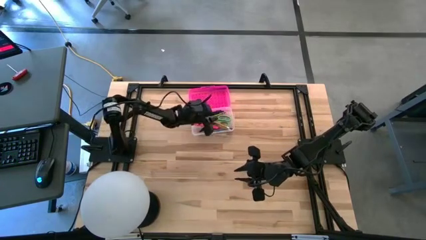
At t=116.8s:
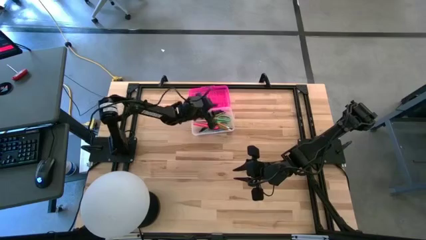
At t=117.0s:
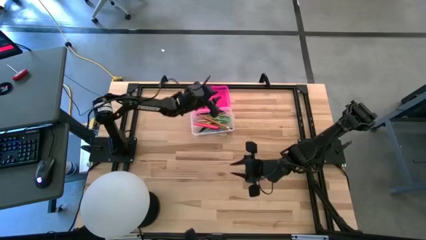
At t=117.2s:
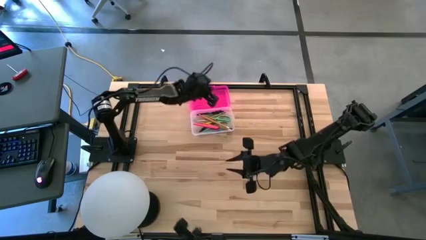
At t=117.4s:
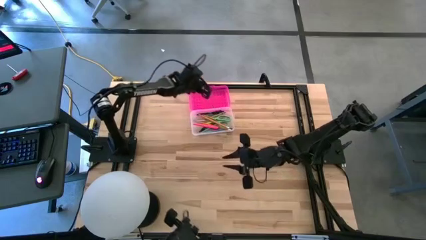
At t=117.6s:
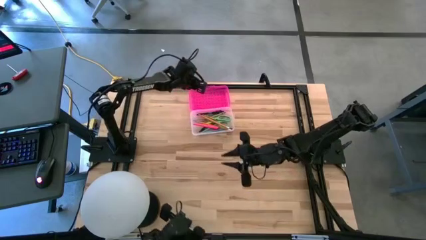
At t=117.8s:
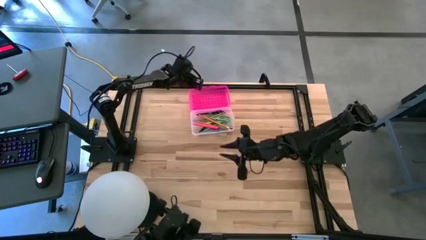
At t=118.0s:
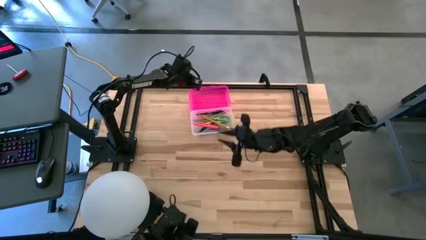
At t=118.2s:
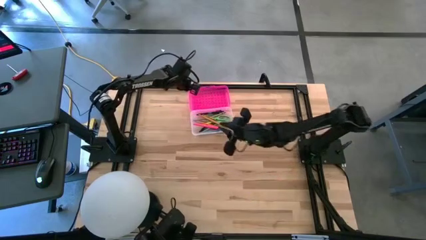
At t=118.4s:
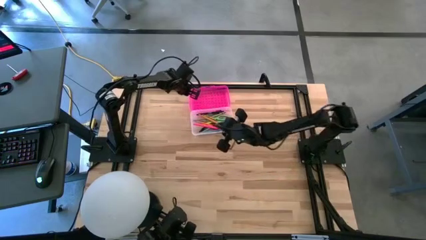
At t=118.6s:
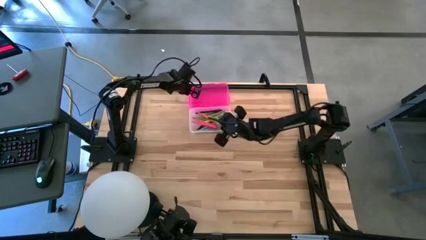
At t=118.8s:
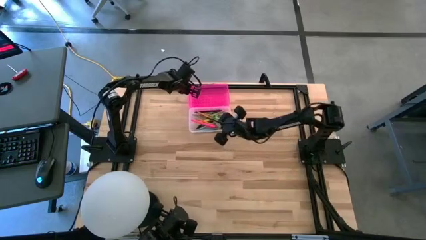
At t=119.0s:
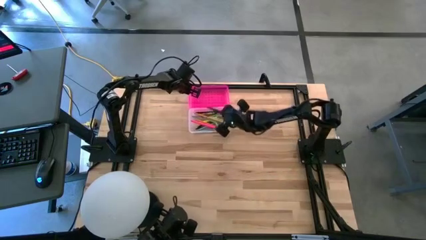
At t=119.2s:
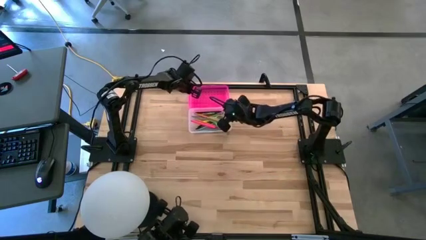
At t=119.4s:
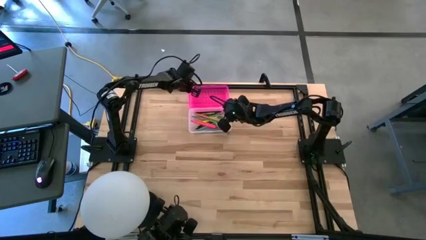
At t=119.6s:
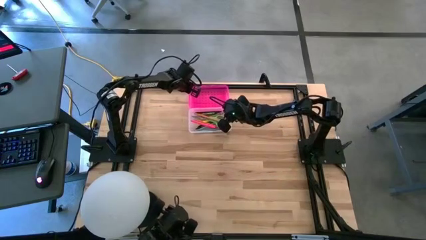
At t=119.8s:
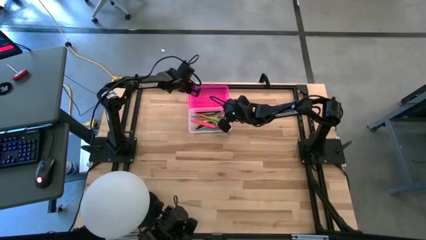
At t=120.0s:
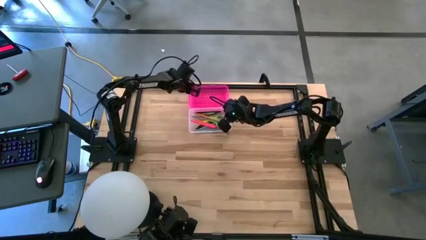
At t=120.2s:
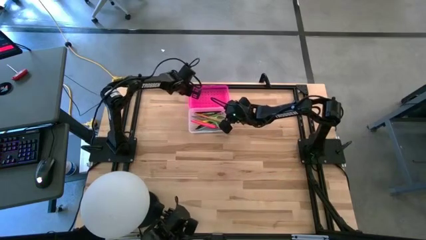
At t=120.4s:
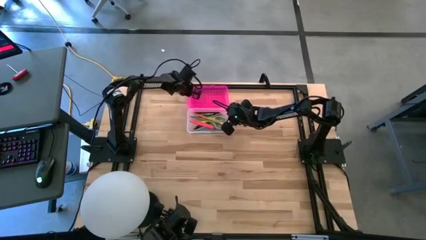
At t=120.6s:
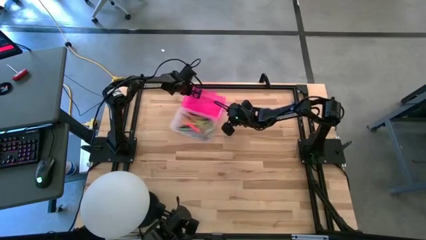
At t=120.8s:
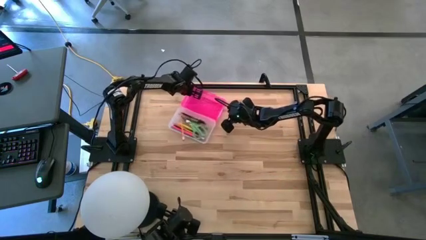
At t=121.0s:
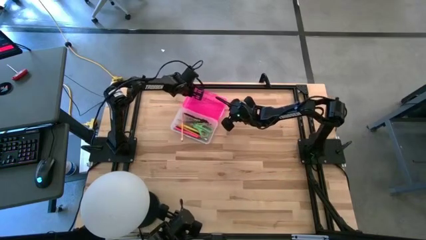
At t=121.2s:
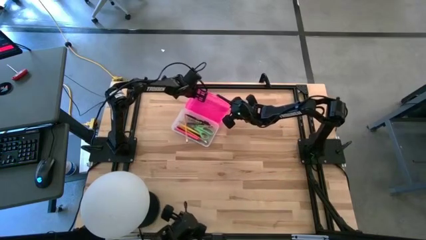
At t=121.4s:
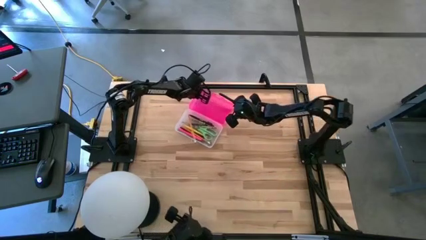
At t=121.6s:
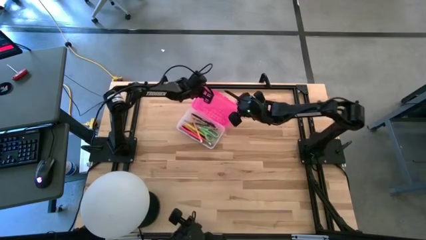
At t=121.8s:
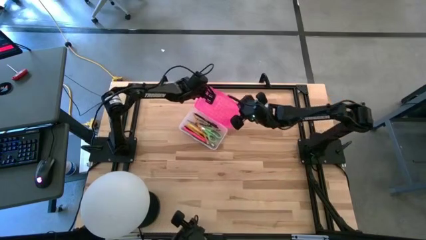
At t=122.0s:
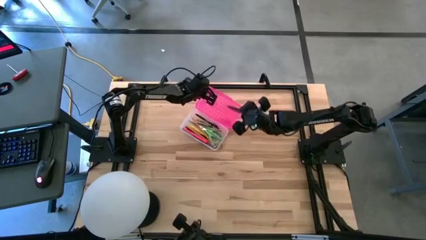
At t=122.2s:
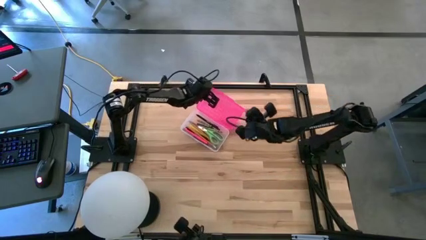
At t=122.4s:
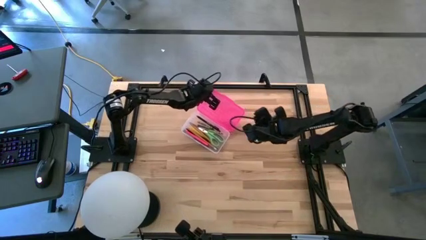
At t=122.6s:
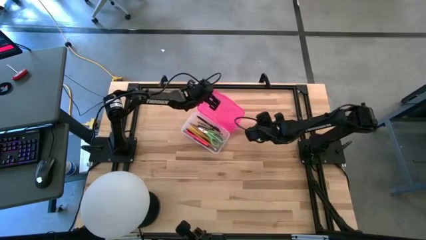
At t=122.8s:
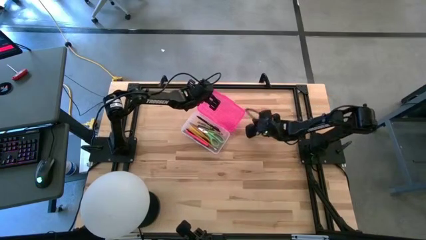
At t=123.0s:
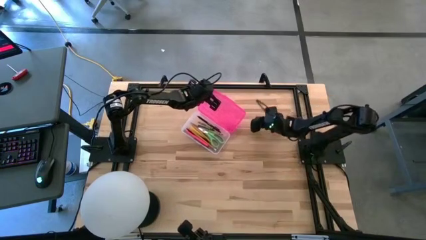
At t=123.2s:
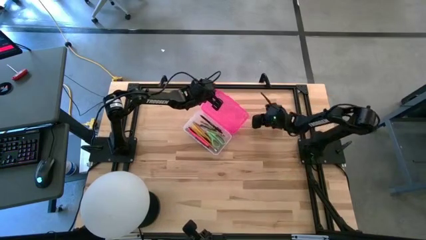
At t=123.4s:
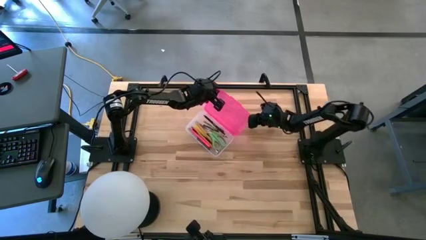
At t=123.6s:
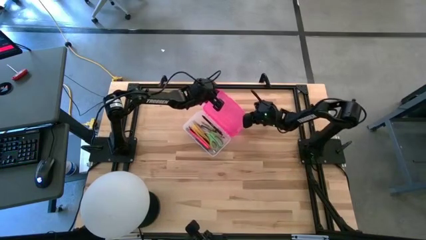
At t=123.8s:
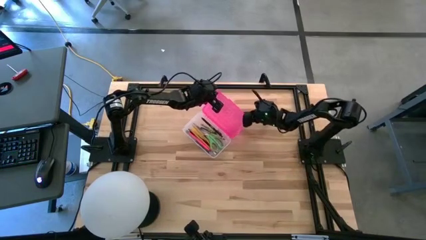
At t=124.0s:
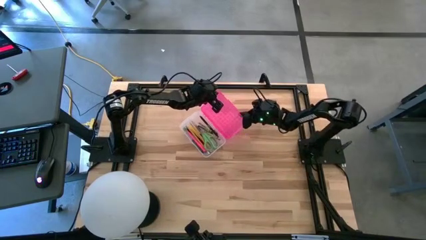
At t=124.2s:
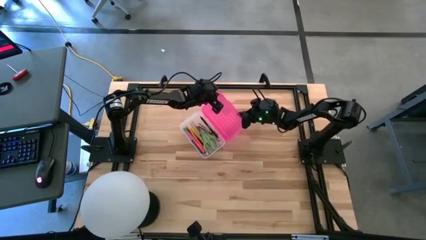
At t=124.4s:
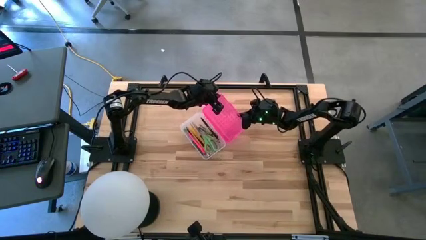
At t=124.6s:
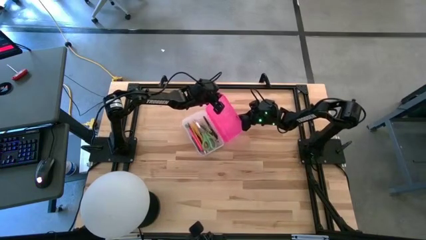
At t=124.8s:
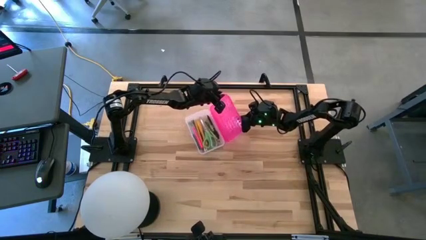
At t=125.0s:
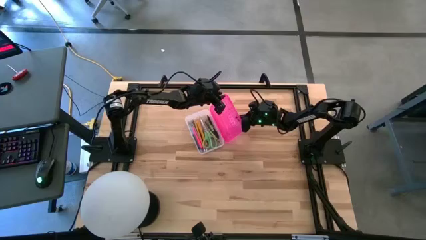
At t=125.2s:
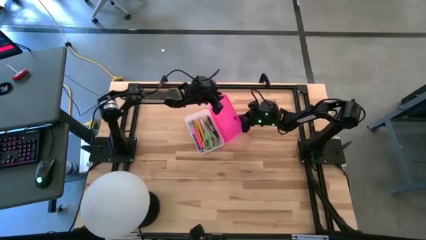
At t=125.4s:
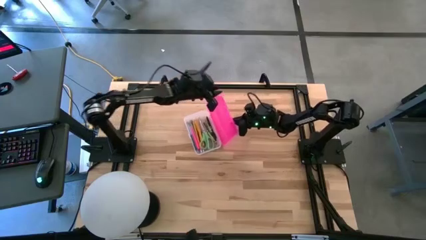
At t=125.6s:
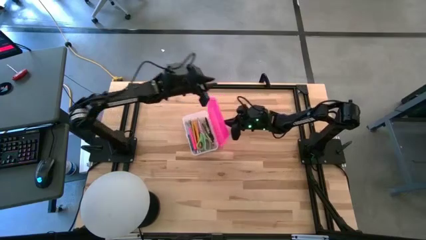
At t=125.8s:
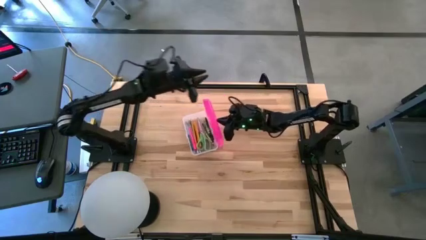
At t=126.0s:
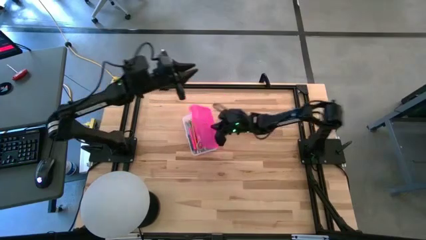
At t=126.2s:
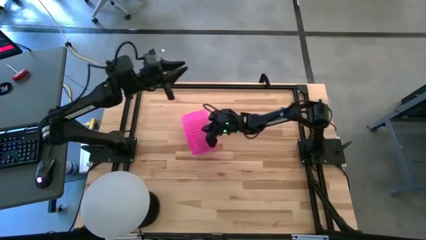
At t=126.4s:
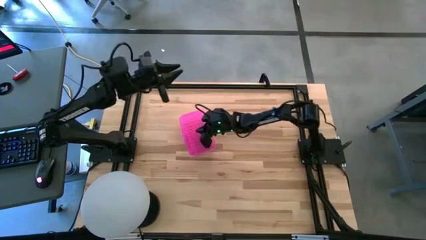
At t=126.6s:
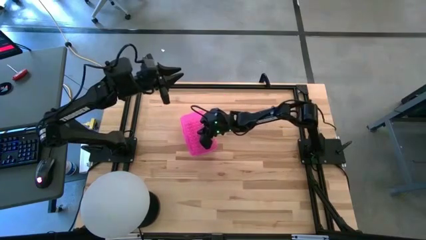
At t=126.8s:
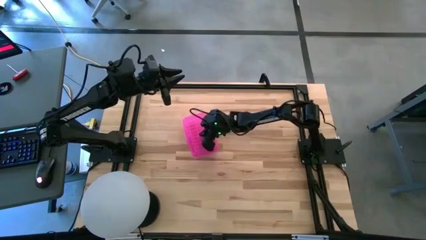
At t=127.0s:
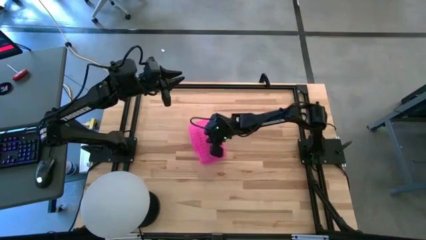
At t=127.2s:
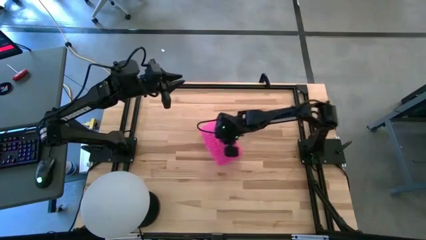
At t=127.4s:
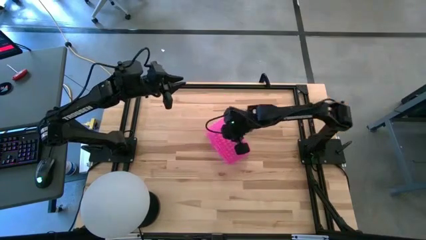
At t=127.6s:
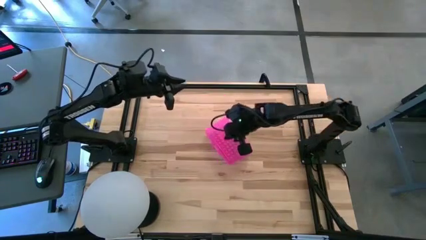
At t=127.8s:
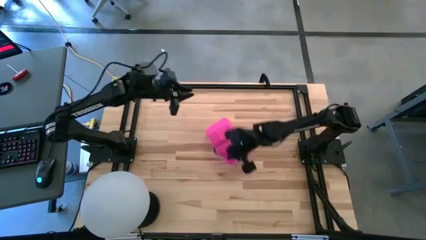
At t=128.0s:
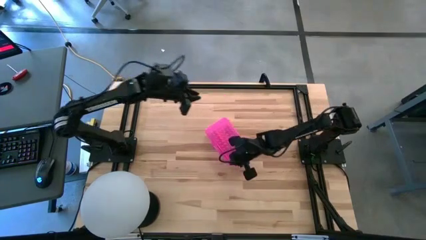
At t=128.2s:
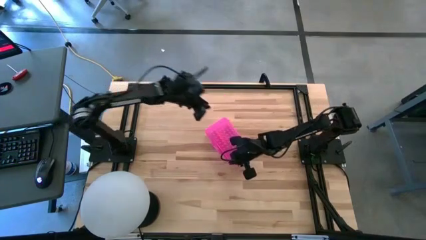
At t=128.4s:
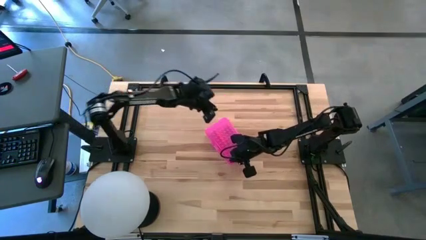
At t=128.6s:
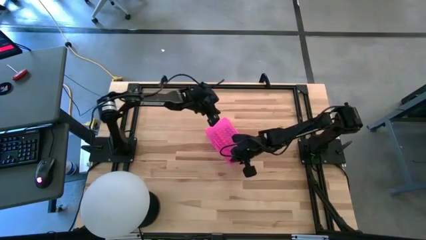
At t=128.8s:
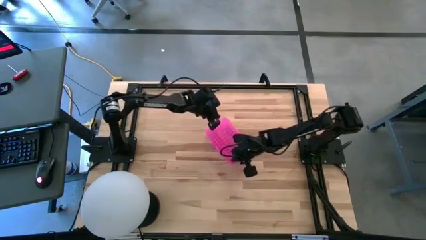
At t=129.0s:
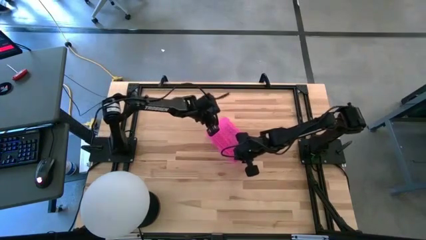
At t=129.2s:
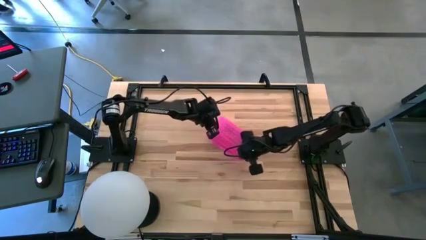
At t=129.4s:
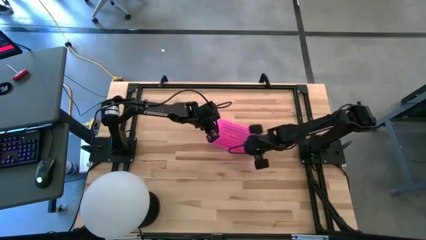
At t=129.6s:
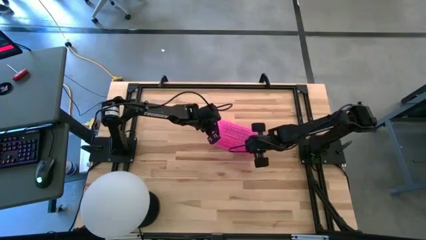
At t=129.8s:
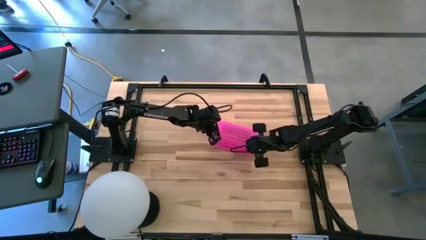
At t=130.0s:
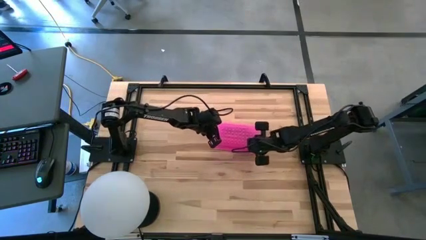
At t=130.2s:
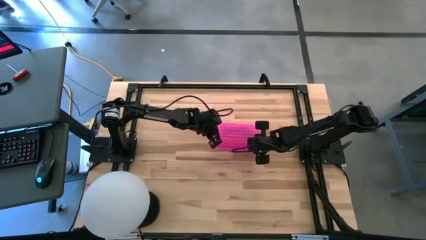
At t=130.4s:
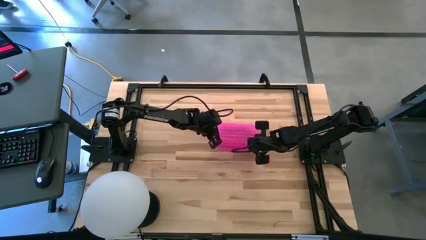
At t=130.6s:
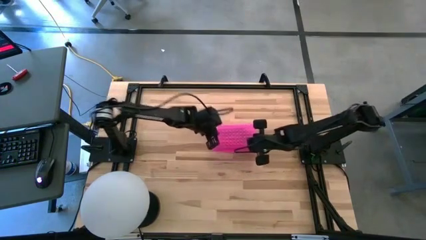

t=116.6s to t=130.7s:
Task: Pick & place school supplies into a supply box
Close the pink supply box
